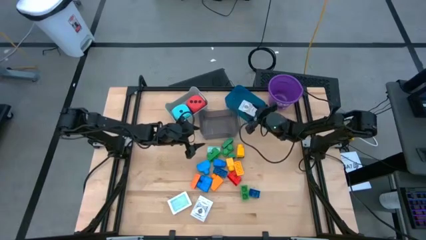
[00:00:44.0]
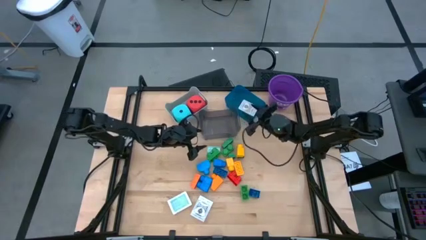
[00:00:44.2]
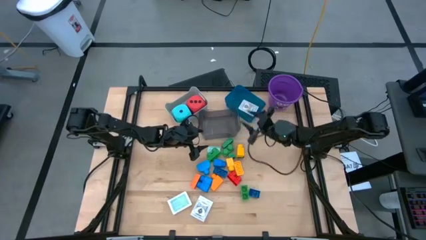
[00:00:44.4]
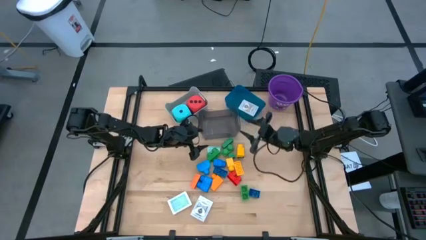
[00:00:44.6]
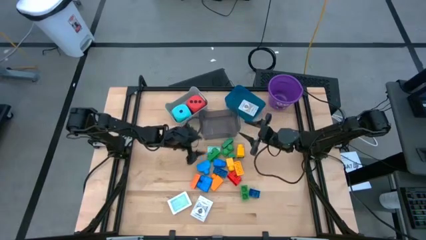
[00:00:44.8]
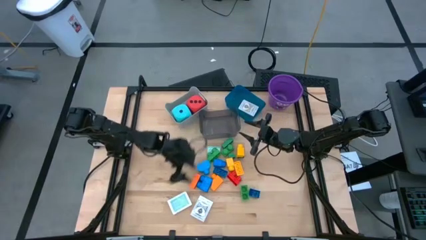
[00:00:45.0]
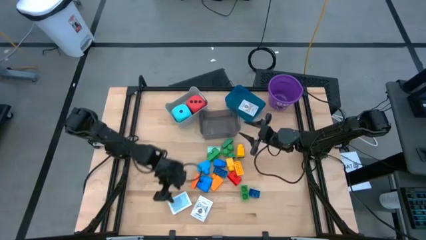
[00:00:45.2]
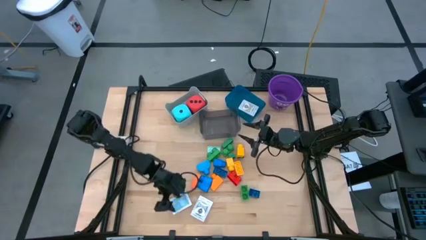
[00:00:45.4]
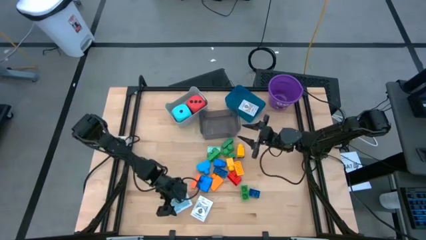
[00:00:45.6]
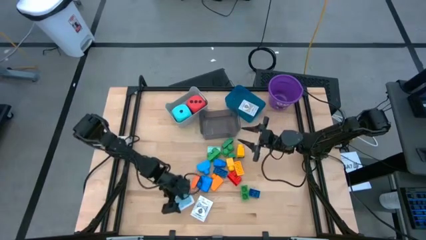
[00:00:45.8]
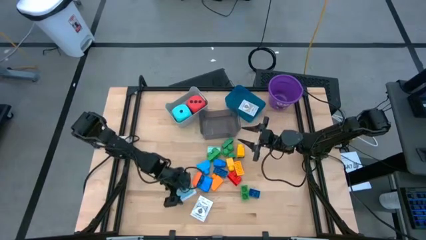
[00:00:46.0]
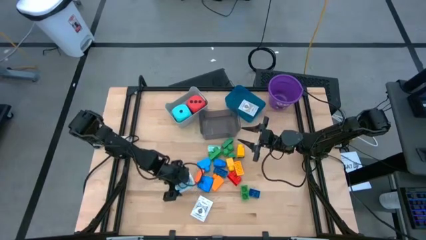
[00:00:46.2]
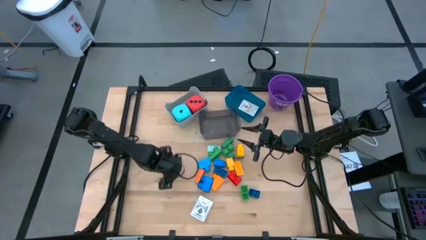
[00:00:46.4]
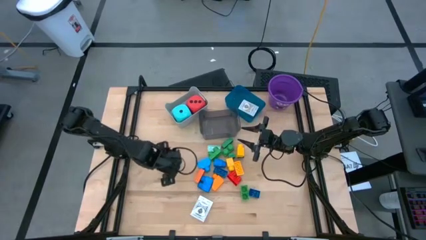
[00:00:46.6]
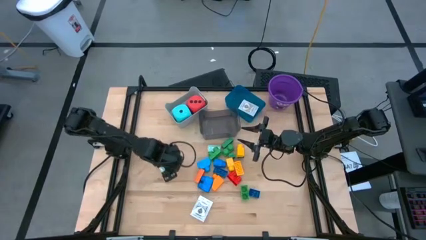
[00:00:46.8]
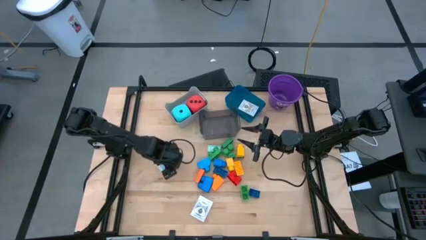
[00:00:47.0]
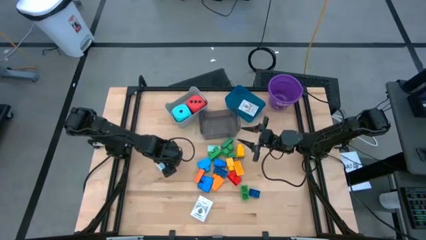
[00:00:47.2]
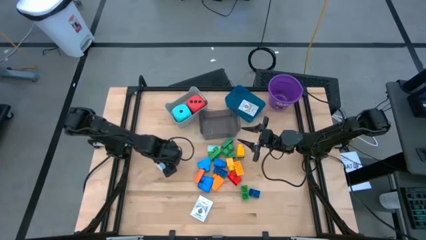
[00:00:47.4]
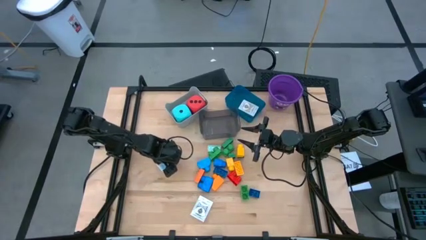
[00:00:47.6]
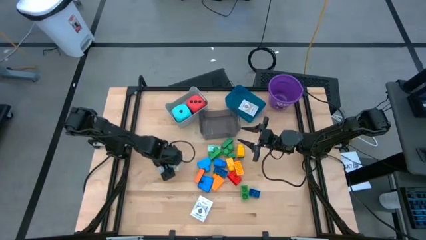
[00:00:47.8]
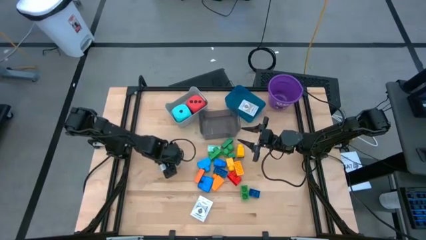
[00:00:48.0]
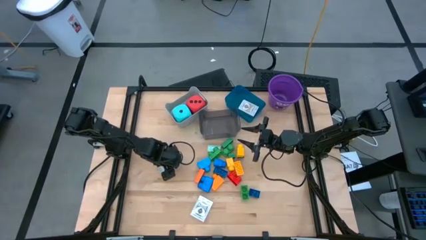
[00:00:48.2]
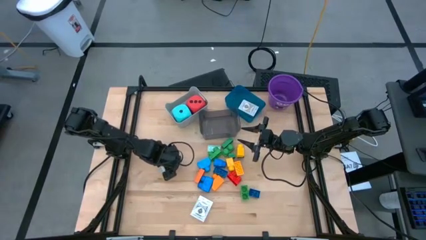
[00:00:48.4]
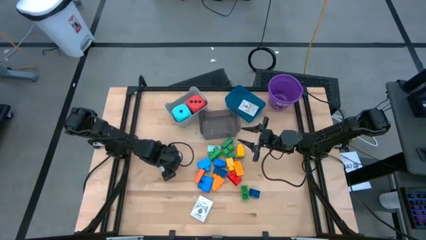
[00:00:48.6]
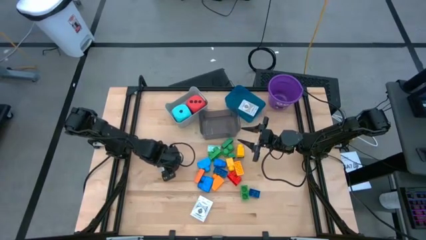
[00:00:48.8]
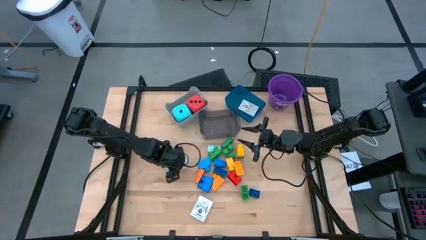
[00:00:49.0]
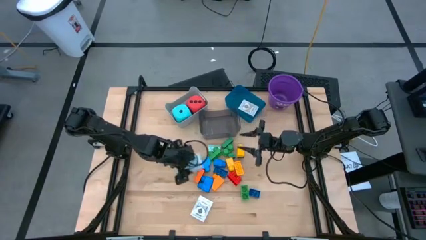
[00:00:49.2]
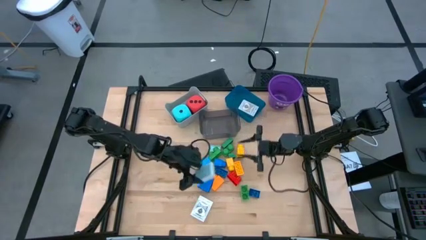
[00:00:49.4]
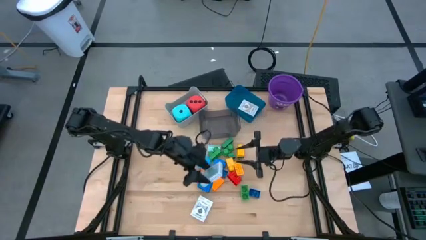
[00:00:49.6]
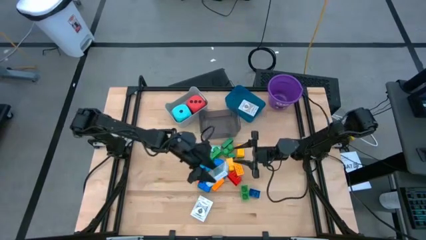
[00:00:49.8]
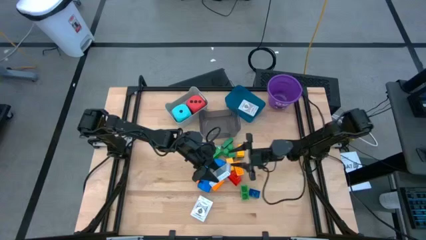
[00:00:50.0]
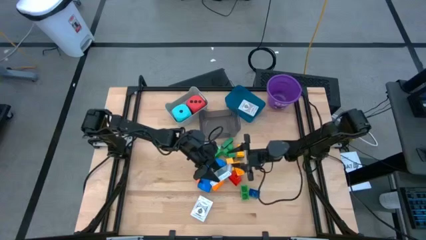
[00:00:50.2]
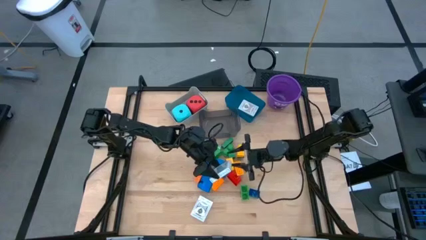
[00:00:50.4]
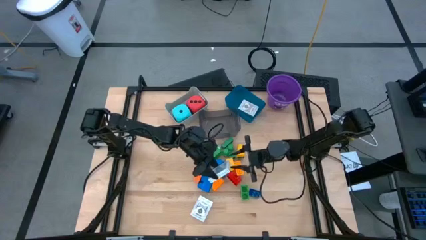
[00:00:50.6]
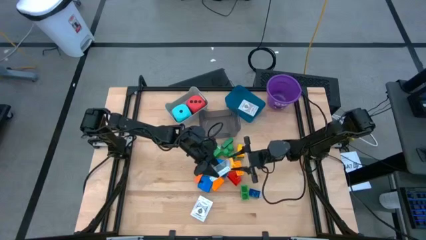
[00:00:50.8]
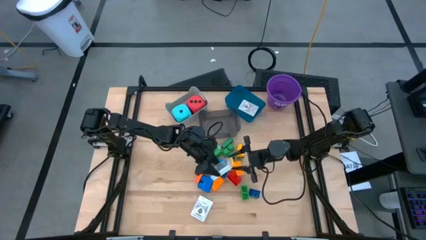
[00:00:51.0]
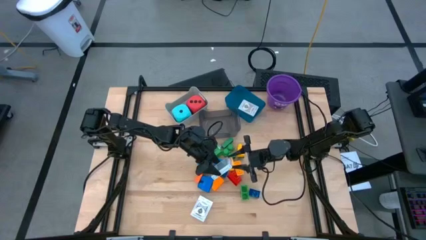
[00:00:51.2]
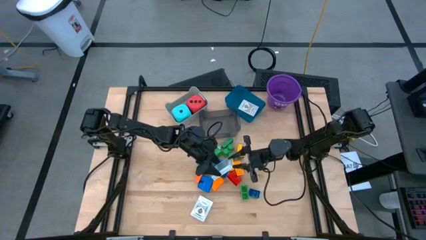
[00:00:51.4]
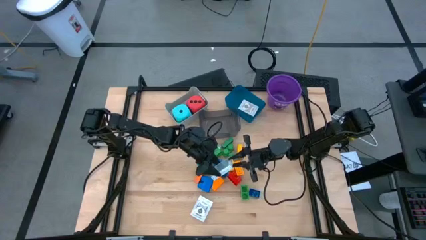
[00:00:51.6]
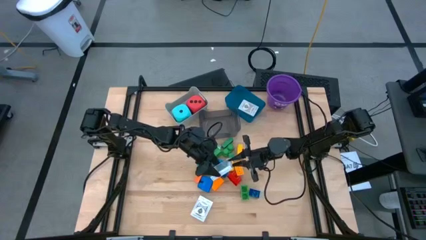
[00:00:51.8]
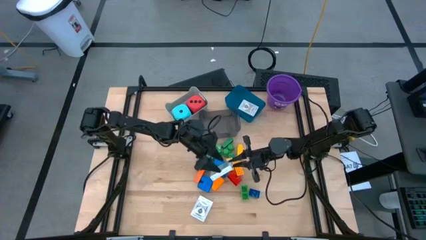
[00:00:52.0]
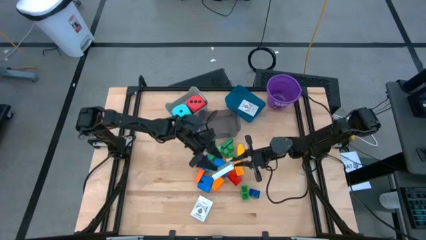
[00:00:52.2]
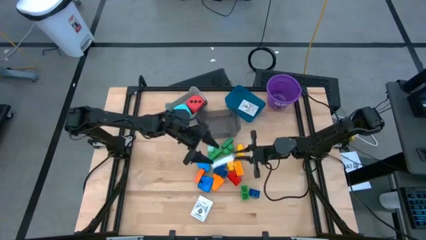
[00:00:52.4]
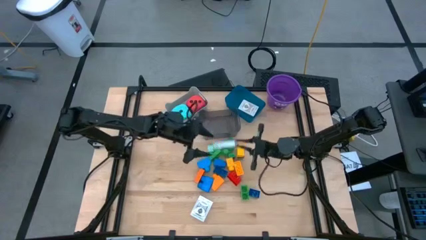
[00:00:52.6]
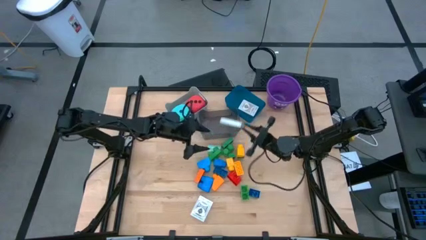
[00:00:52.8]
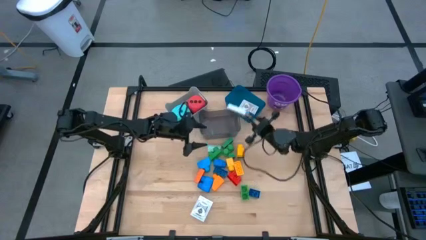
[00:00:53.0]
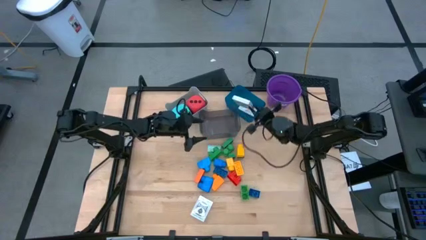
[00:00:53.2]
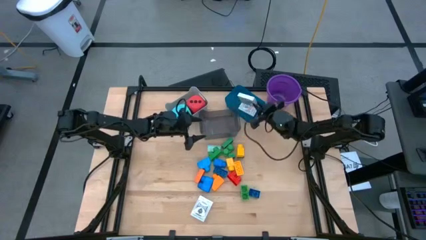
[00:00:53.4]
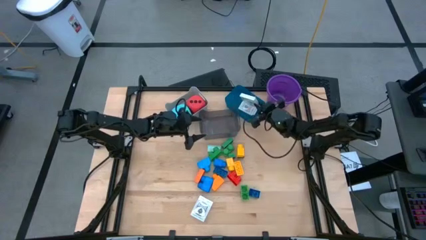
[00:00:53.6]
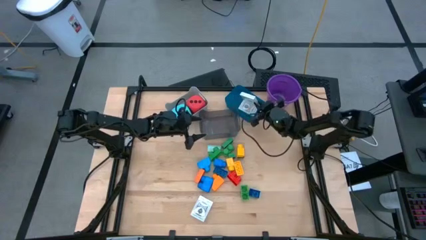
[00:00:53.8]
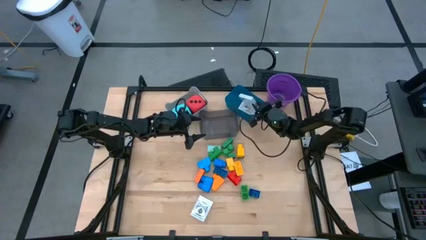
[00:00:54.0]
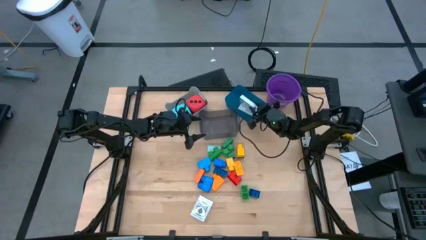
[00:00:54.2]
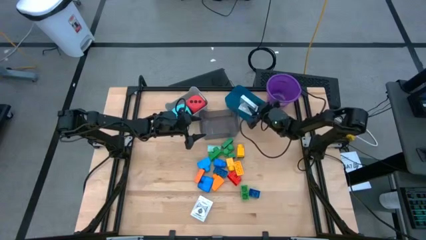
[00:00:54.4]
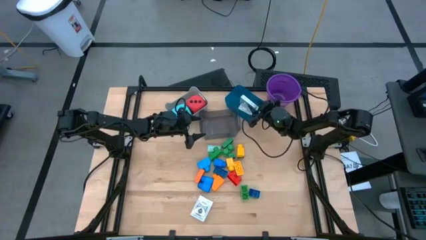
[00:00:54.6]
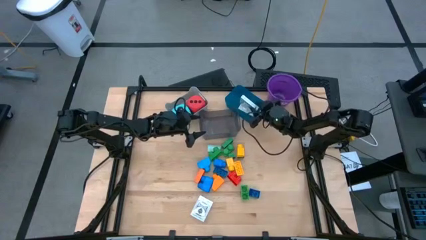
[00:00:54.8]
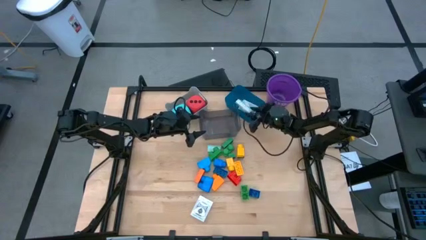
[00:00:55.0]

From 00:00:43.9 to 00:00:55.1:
Task: Pick & Place Toys
Put the blue playing card box into the blue bin

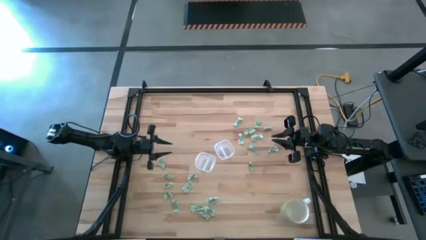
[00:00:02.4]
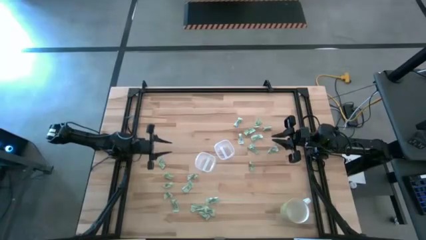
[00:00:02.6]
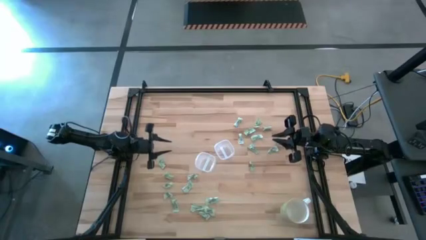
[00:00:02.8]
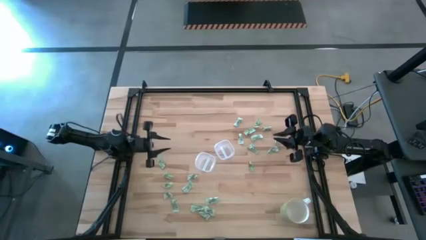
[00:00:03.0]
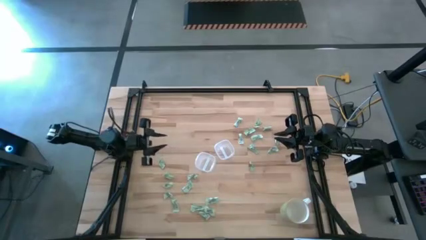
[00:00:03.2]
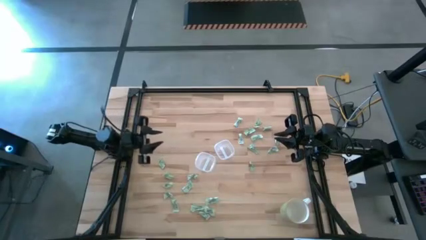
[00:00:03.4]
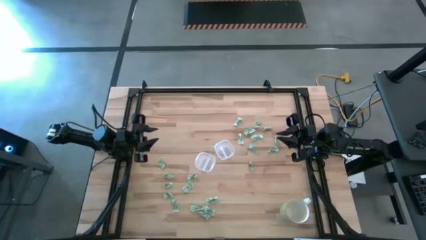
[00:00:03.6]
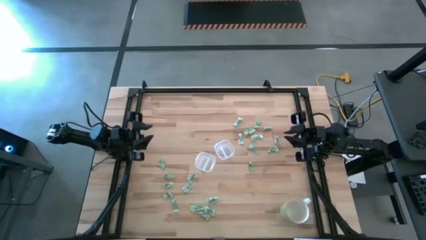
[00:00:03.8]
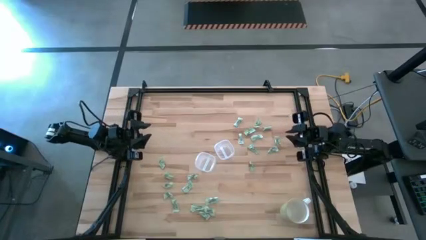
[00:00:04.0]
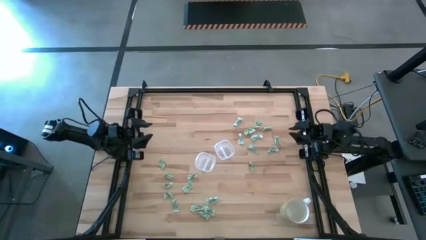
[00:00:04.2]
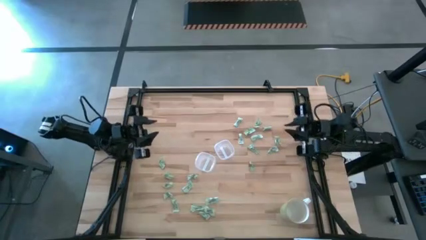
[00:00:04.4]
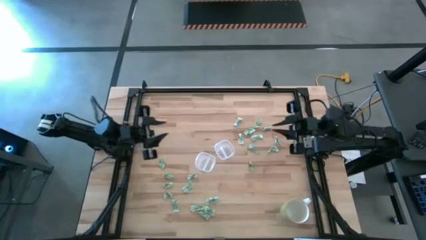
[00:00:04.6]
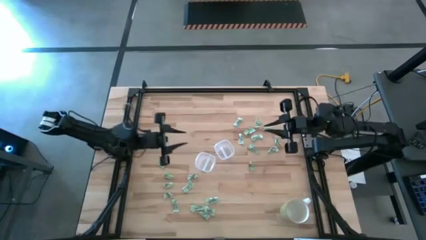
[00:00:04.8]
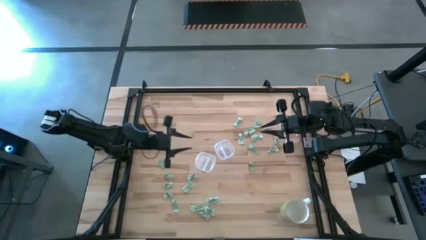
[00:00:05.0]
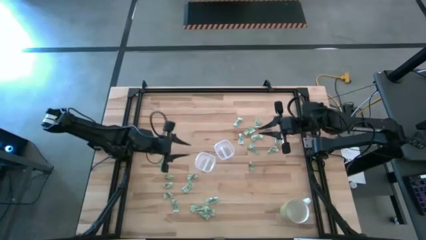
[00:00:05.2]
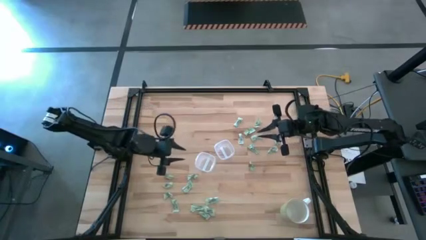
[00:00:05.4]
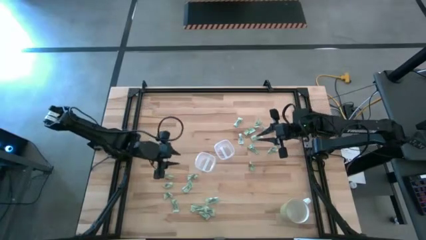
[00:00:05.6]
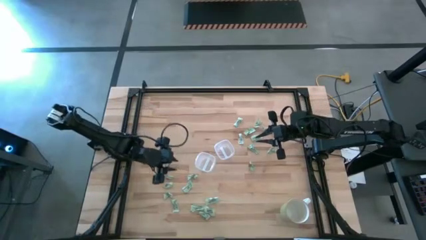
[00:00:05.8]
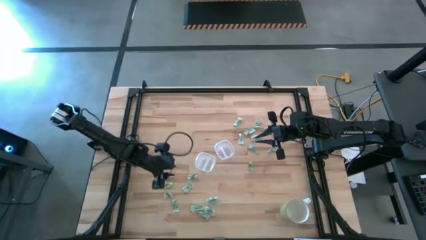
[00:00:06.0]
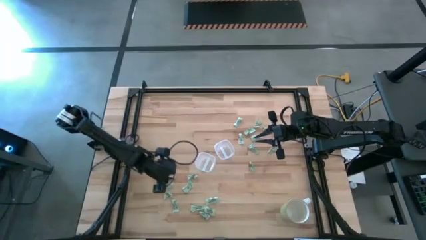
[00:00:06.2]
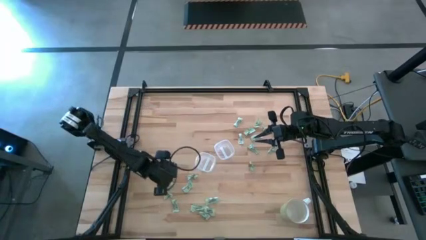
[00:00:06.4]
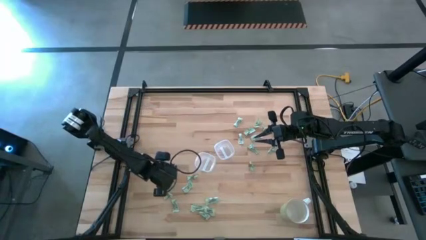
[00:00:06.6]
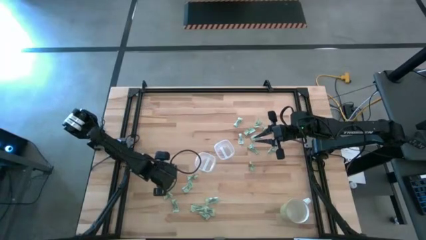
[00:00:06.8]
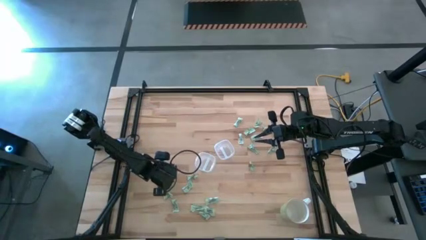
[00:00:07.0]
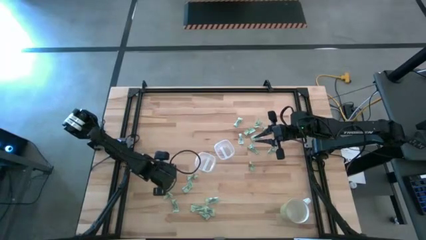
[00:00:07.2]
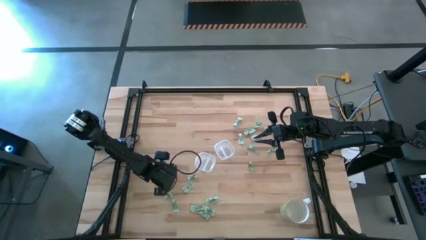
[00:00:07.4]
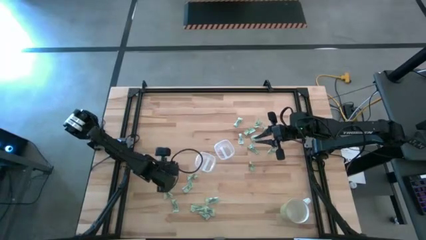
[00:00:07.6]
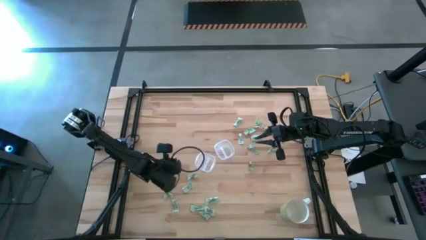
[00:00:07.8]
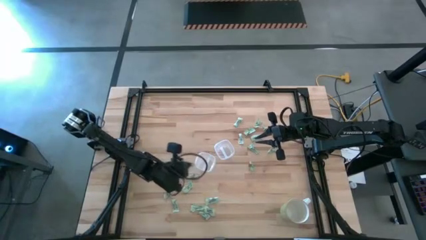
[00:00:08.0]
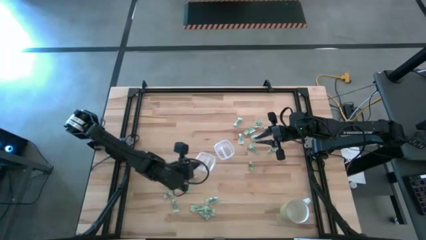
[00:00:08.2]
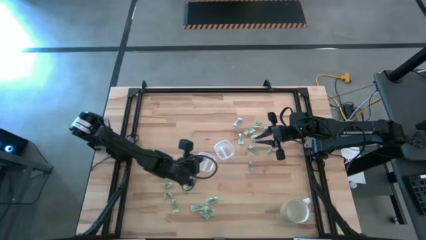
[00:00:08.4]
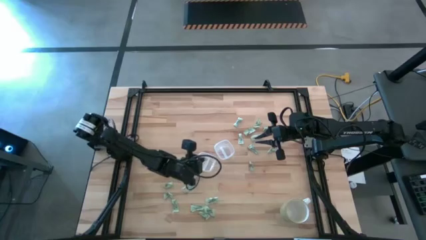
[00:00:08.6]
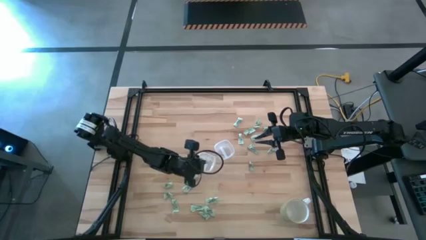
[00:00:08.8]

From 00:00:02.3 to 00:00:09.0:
Task: Pick and place items into bin
Put the stevia packet into the left bin
